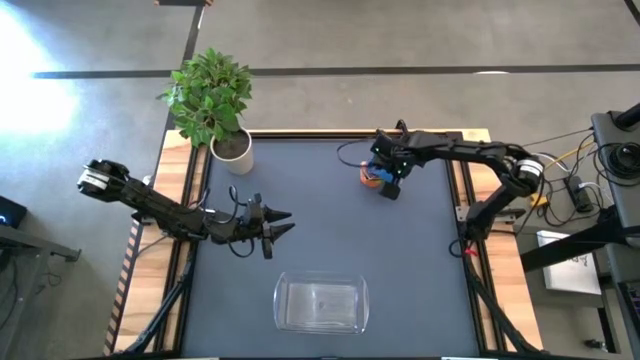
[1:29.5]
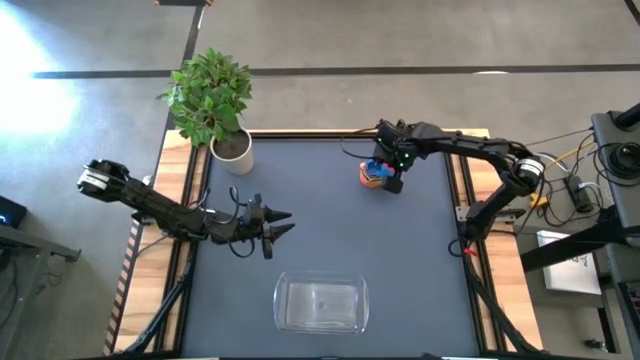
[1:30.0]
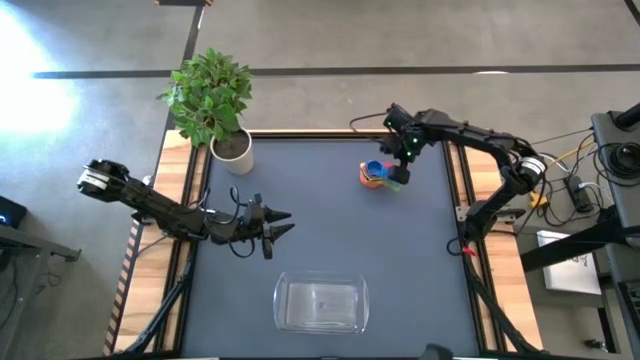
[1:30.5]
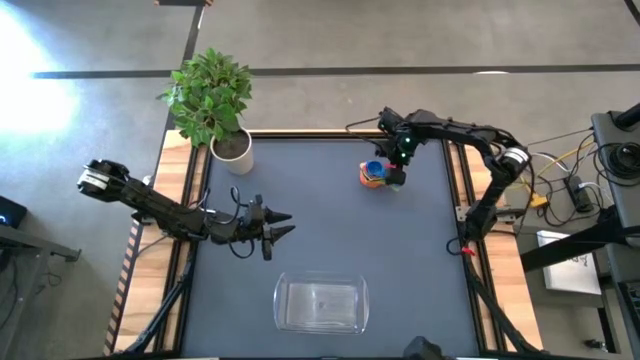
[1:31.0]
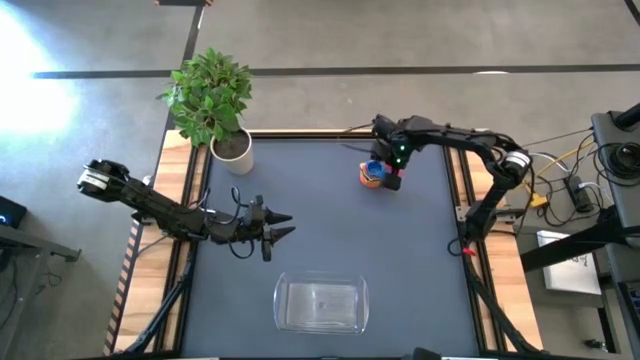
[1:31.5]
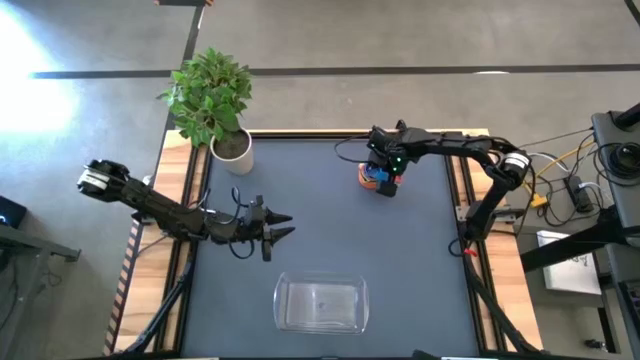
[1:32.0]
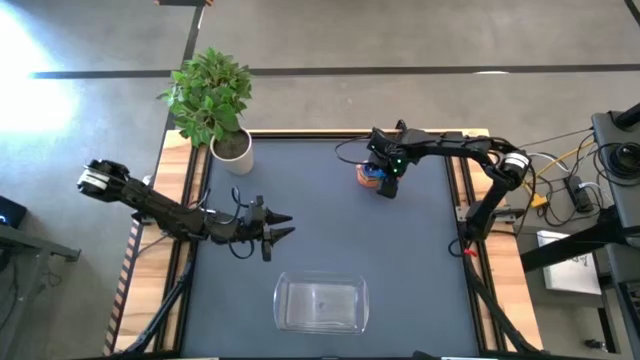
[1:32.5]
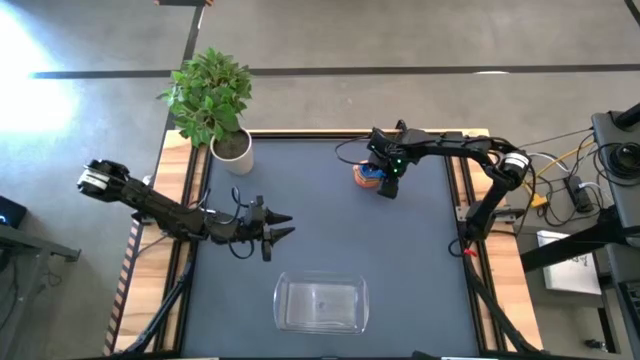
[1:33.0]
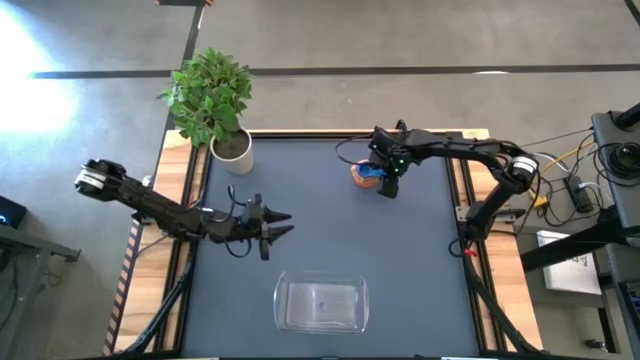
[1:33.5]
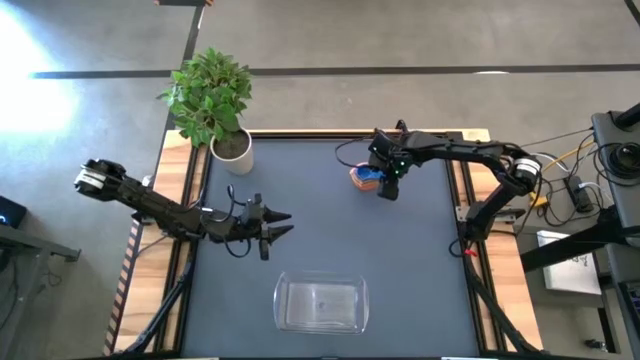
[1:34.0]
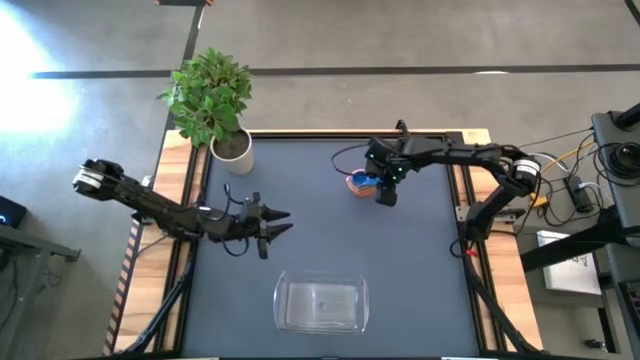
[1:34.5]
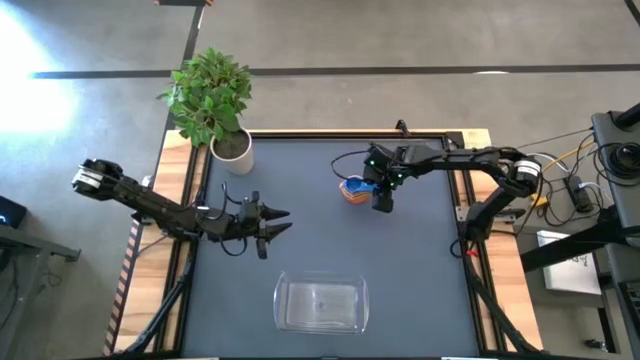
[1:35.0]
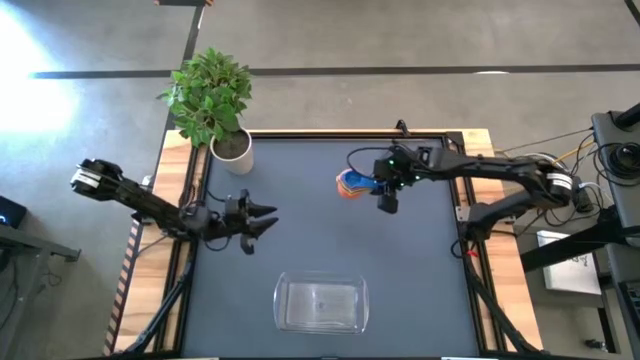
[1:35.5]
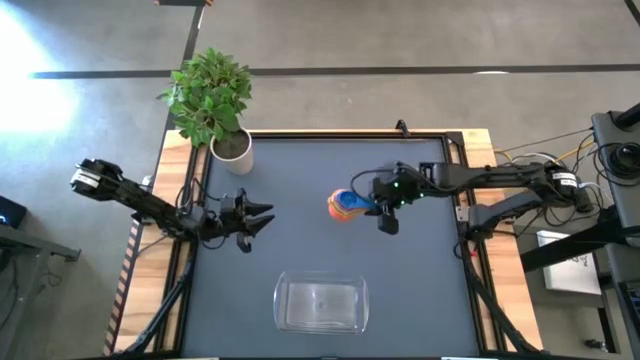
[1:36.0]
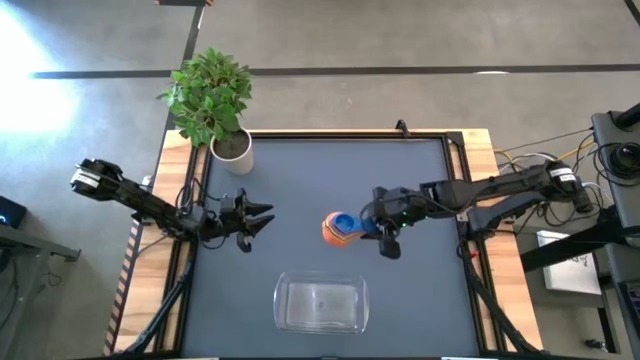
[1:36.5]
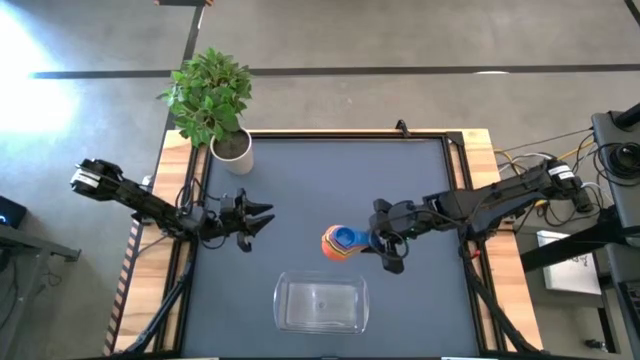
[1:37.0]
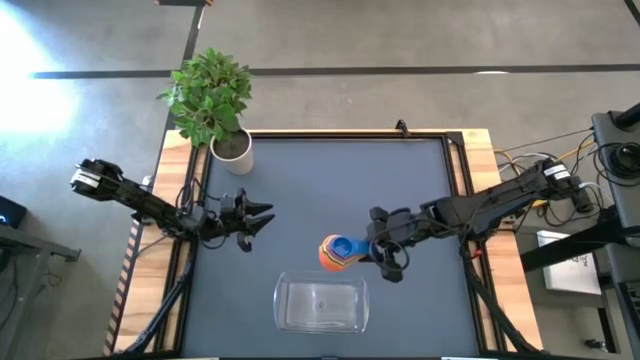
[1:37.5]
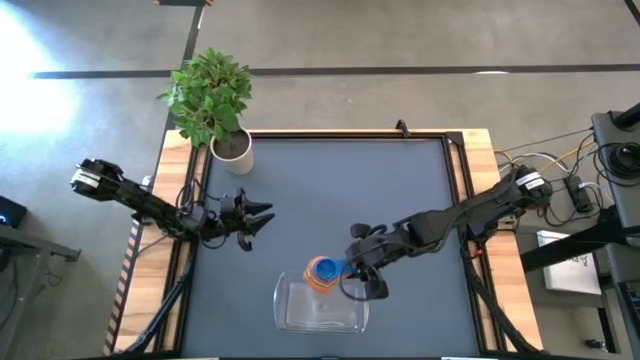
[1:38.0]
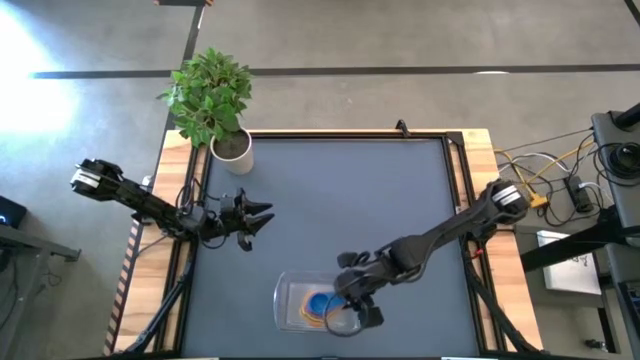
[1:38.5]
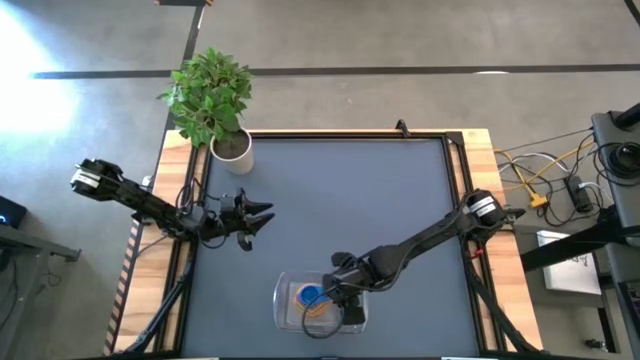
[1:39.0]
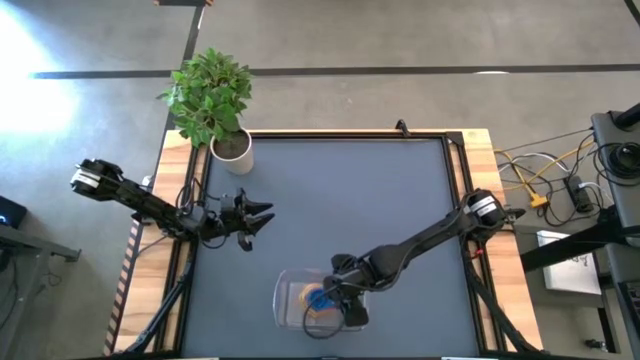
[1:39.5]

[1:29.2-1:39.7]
Task: Nest measuring cups in basket
Put the stacked measuring cups into the transparent bin

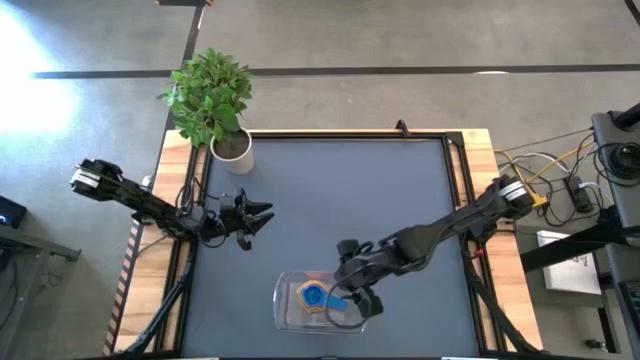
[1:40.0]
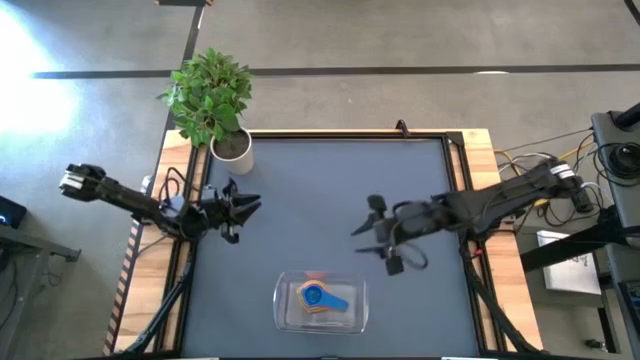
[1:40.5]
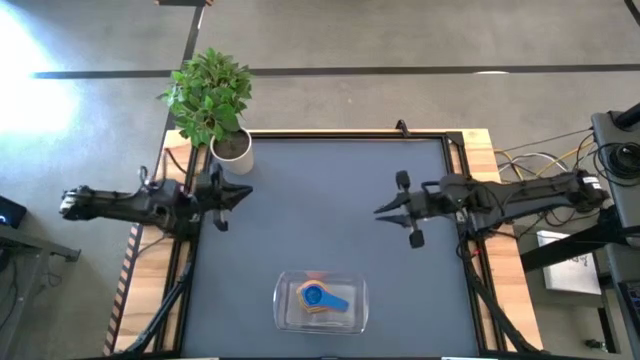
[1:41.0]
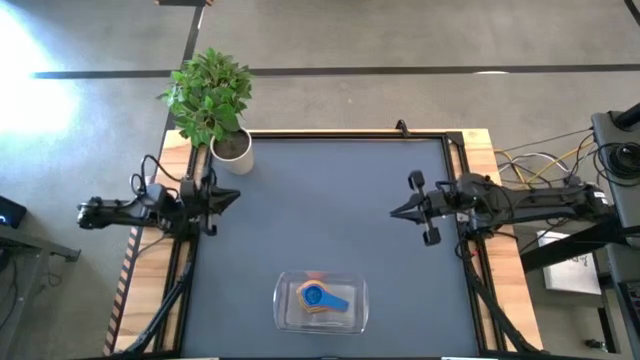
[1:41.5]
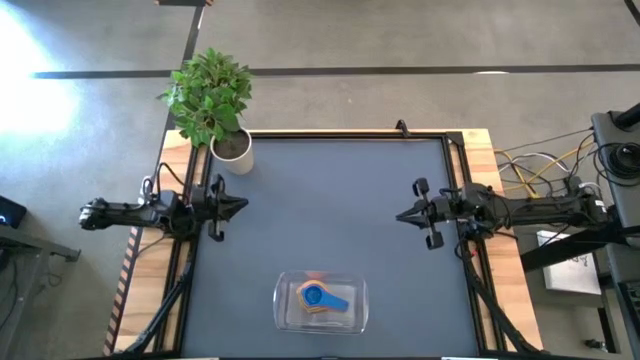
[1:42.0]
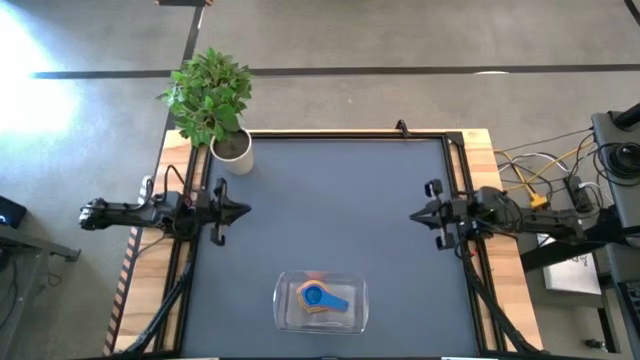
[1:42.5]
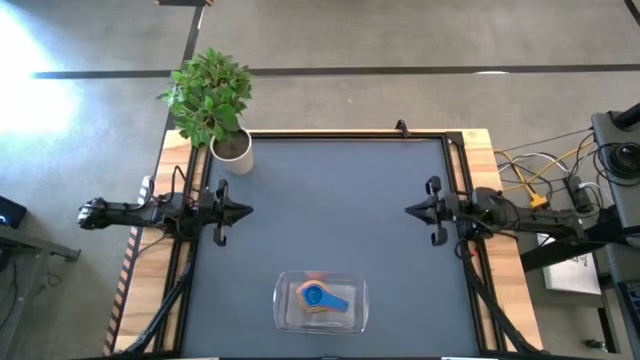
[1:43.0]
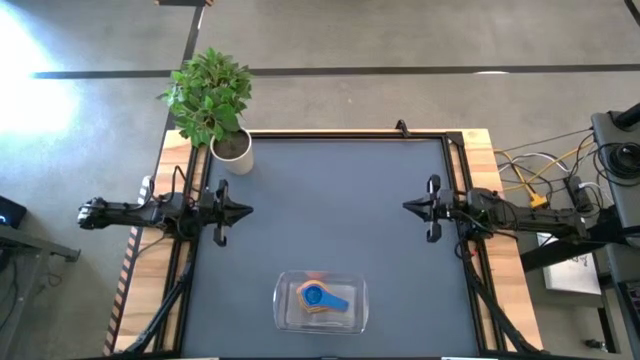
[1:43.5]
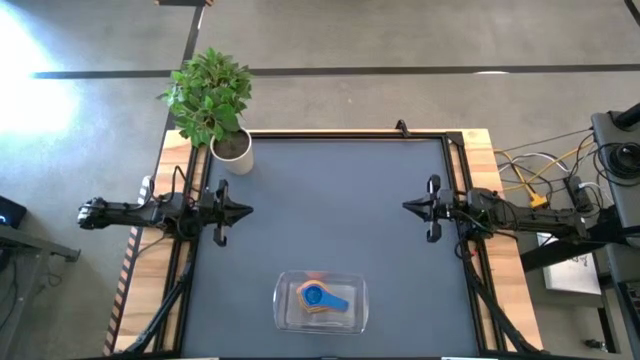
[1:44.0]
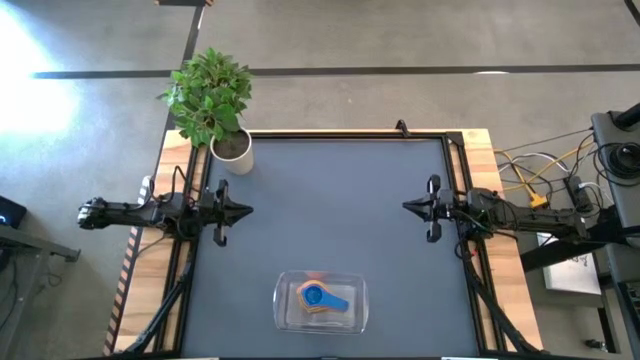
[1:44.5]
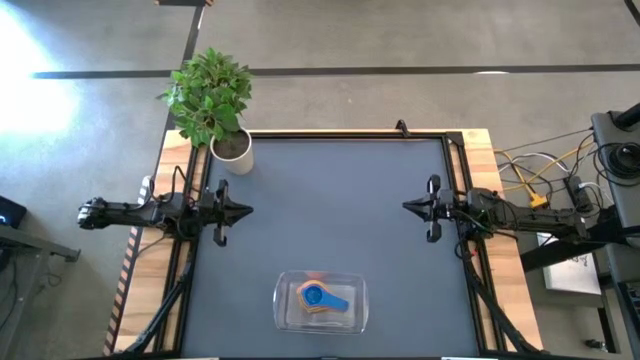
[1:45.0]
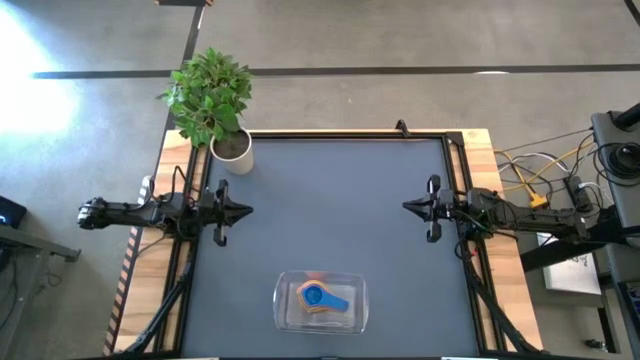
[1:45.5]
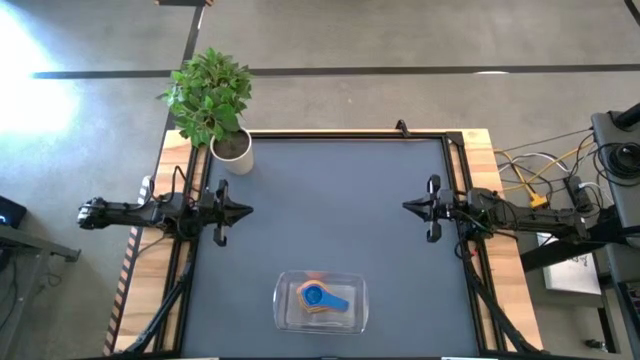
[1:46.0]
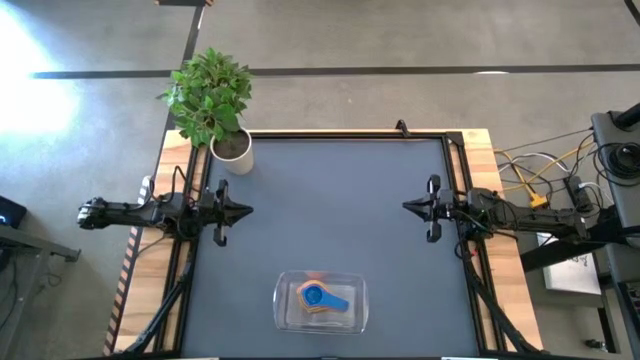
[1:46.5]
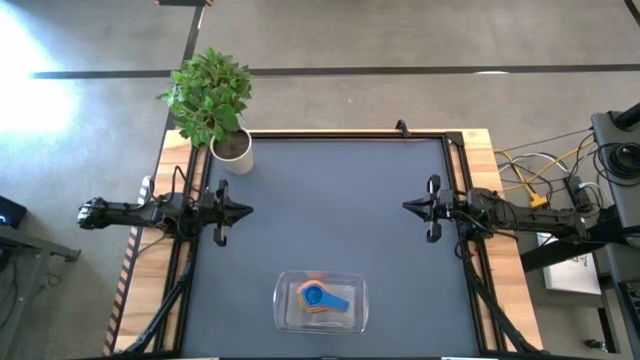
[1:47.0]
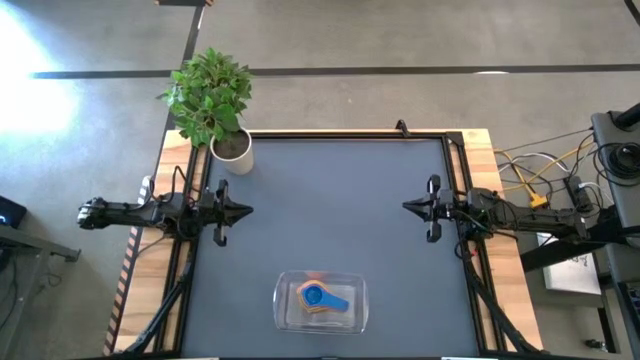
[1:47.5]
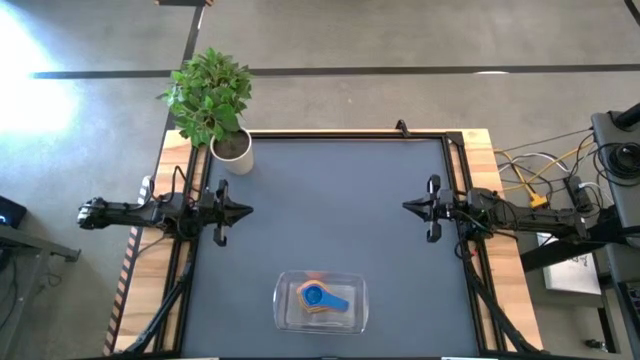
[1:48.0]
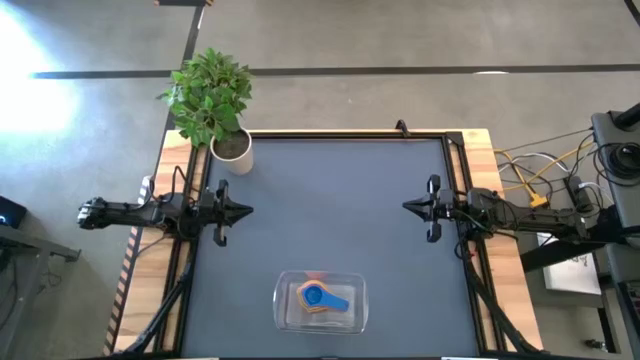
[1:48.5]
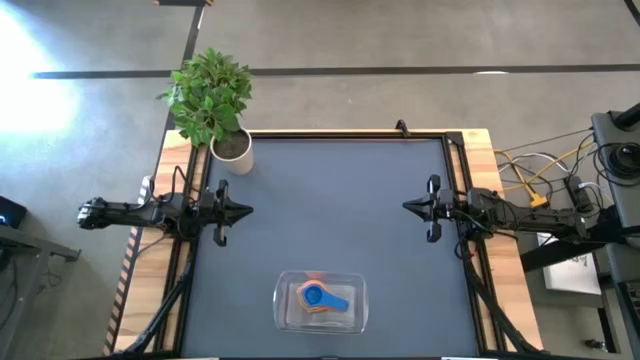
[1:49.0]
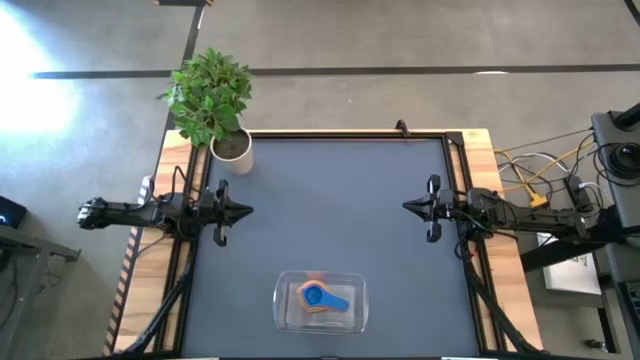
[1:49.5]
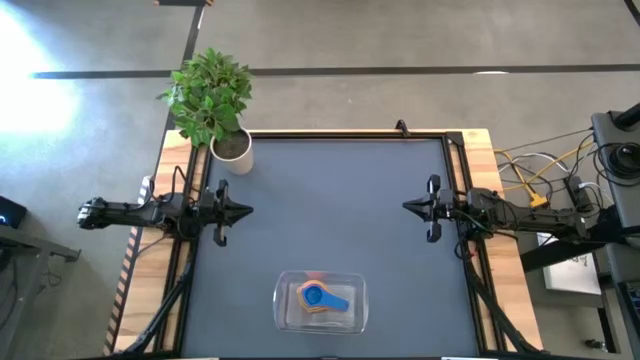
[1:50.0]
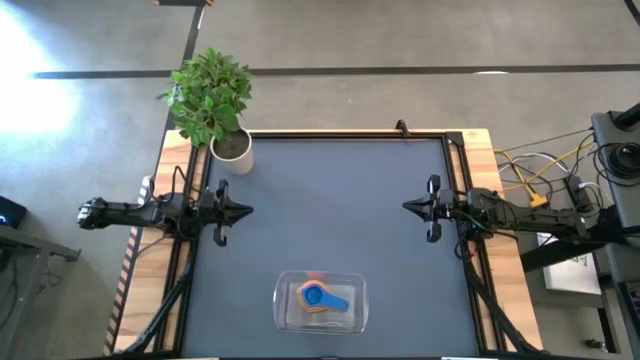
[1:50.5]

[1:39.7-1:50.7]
Return to Home Position
